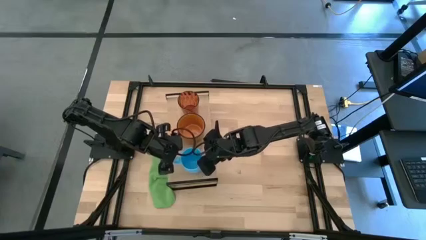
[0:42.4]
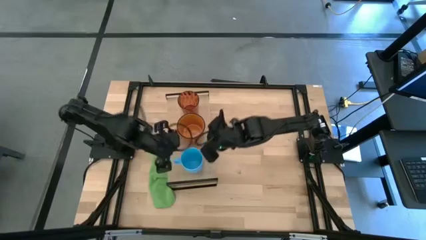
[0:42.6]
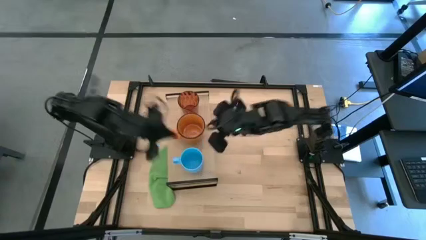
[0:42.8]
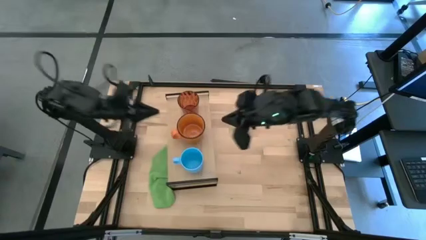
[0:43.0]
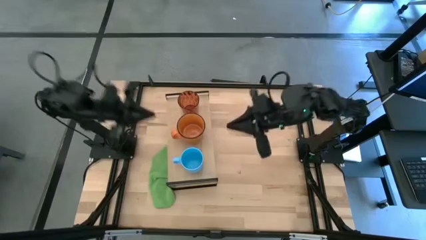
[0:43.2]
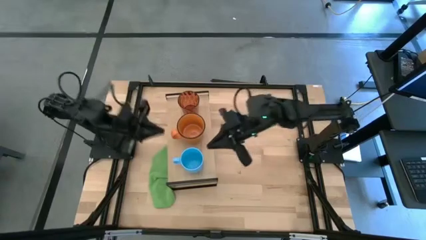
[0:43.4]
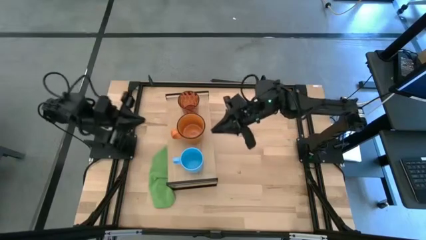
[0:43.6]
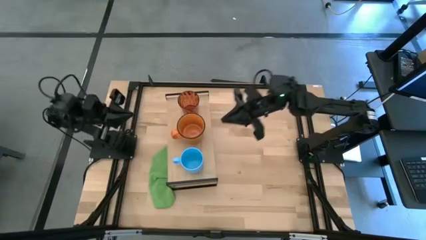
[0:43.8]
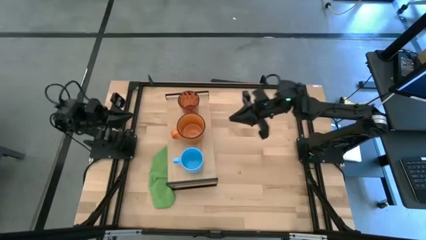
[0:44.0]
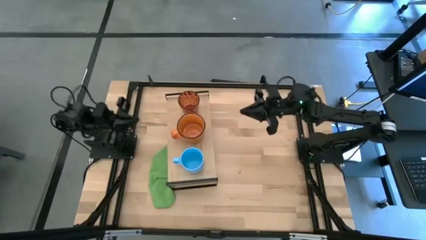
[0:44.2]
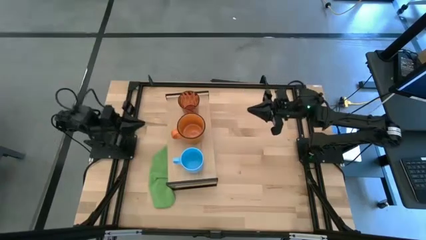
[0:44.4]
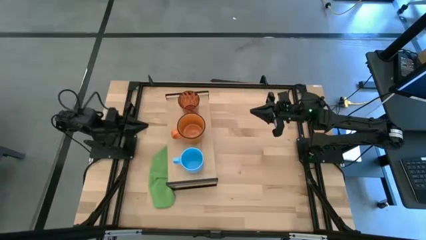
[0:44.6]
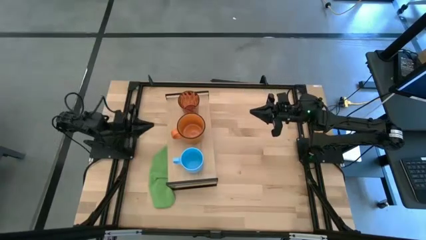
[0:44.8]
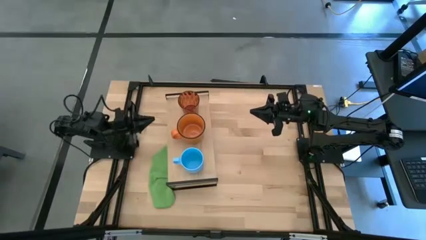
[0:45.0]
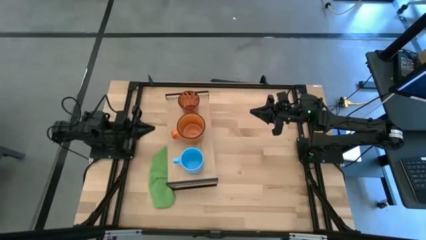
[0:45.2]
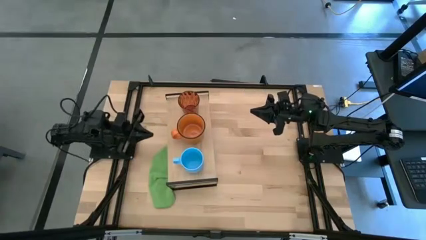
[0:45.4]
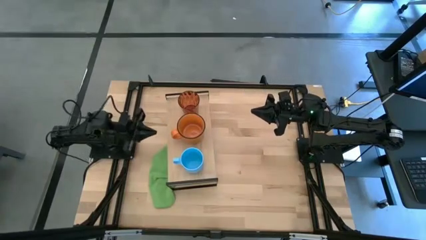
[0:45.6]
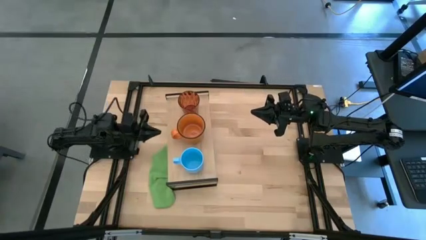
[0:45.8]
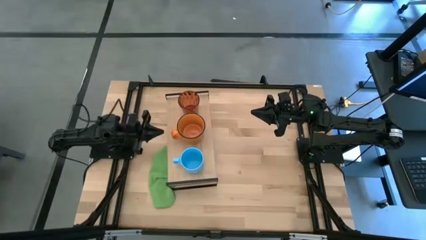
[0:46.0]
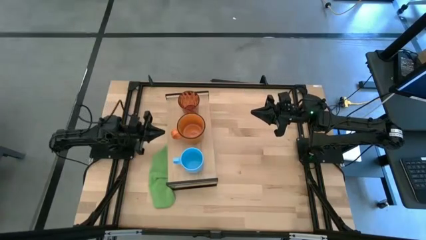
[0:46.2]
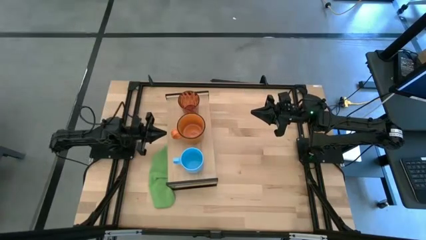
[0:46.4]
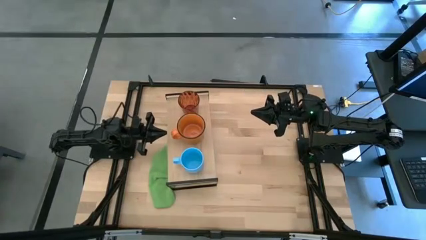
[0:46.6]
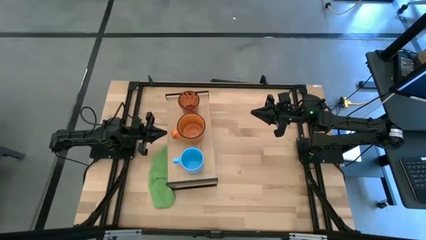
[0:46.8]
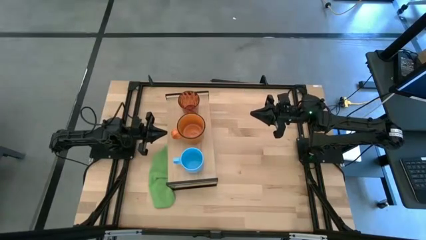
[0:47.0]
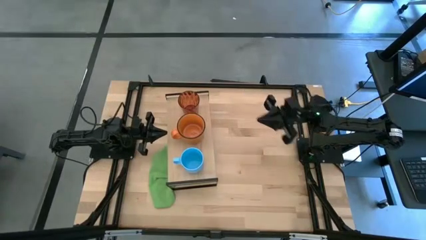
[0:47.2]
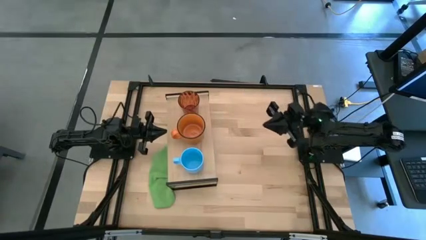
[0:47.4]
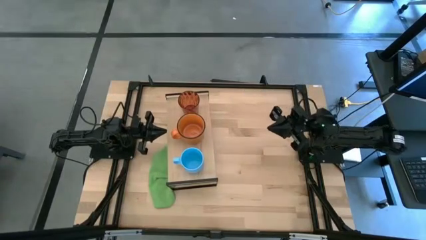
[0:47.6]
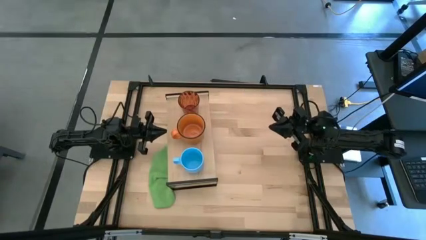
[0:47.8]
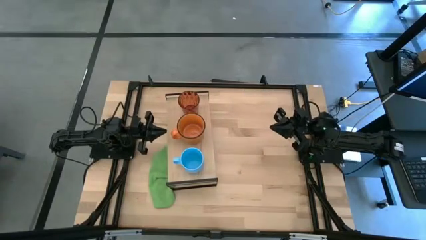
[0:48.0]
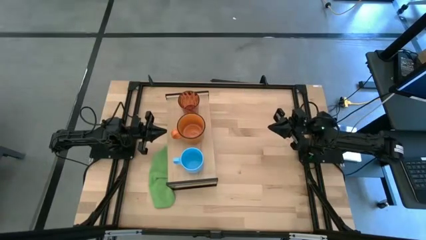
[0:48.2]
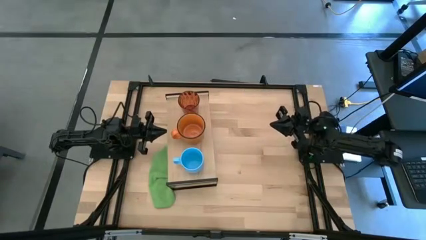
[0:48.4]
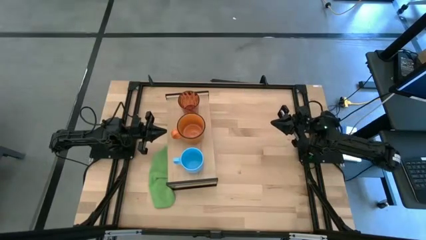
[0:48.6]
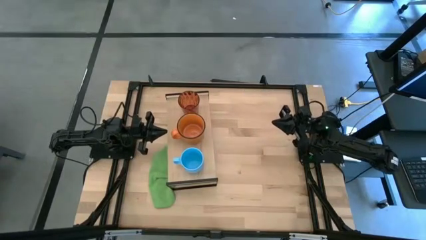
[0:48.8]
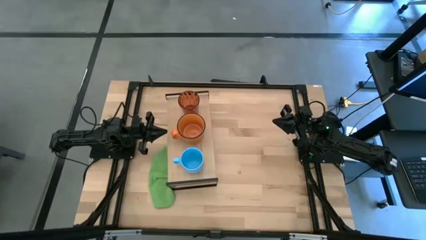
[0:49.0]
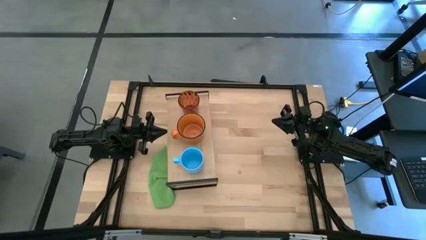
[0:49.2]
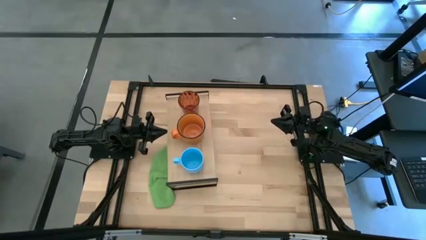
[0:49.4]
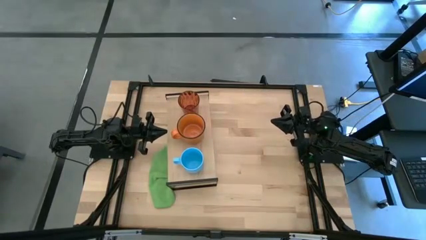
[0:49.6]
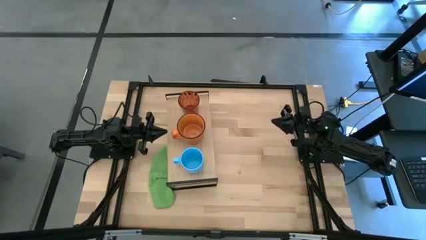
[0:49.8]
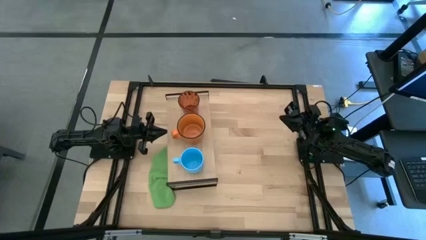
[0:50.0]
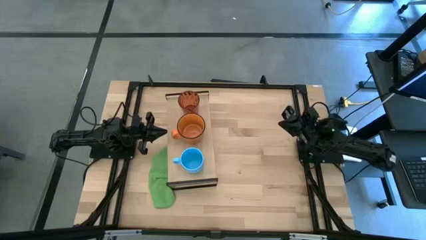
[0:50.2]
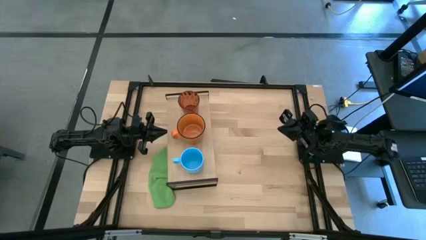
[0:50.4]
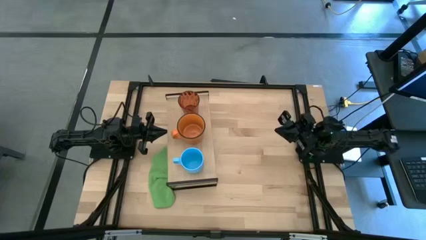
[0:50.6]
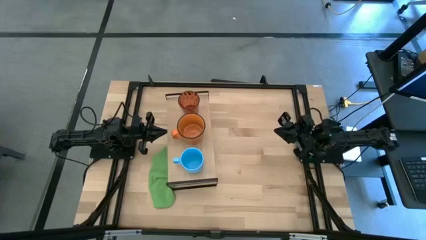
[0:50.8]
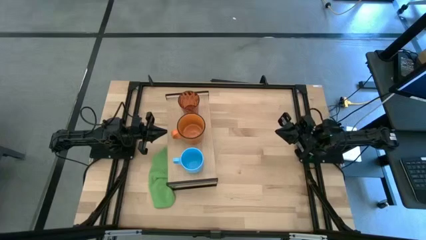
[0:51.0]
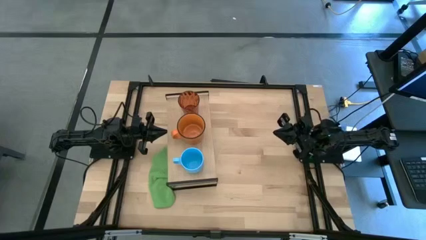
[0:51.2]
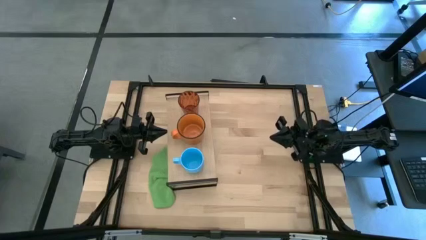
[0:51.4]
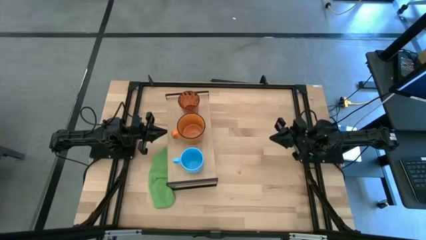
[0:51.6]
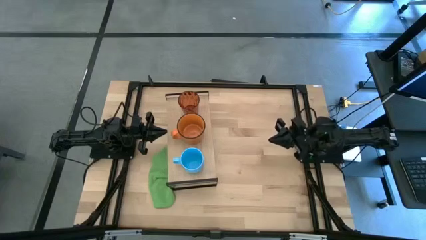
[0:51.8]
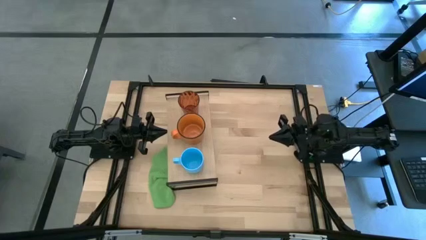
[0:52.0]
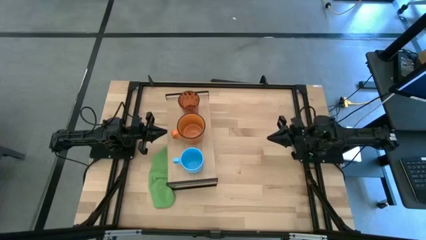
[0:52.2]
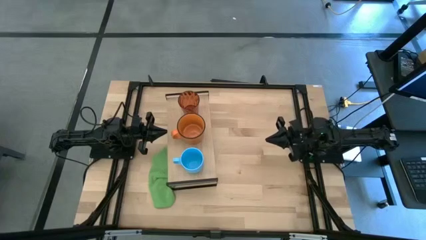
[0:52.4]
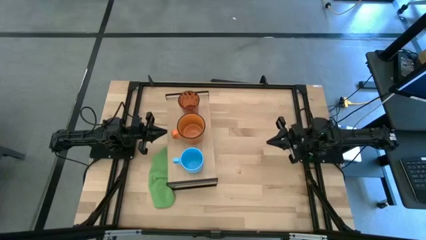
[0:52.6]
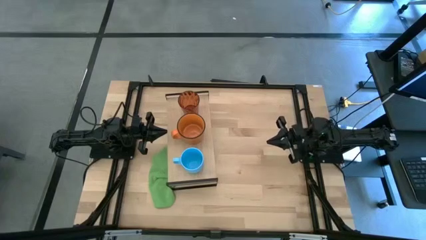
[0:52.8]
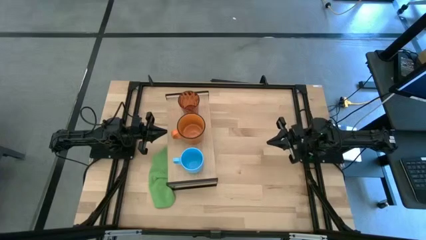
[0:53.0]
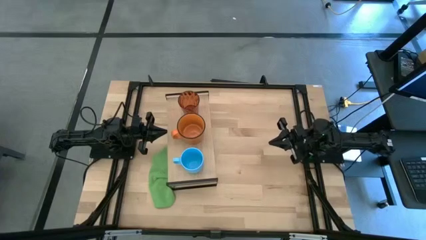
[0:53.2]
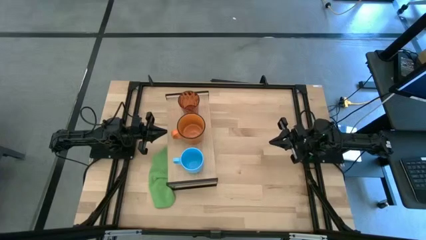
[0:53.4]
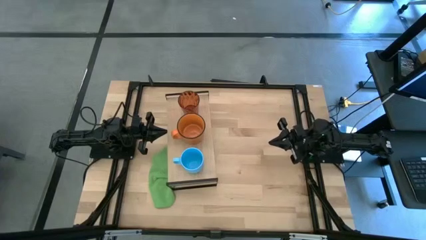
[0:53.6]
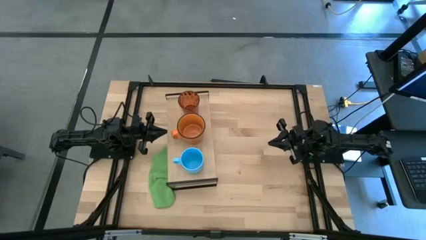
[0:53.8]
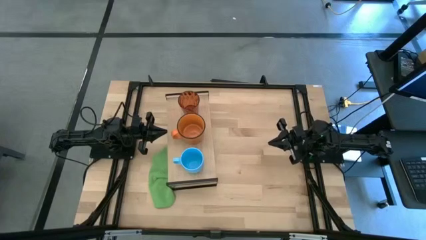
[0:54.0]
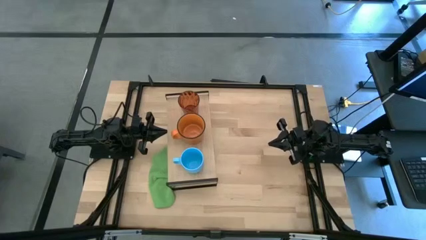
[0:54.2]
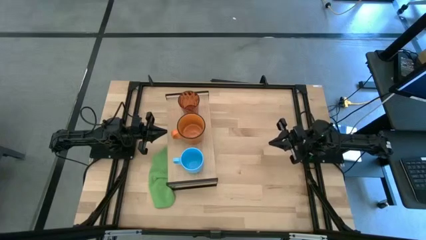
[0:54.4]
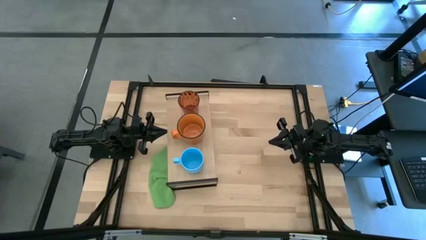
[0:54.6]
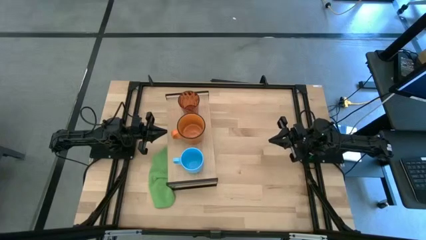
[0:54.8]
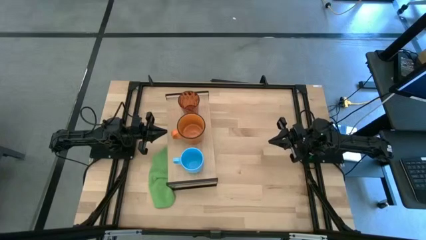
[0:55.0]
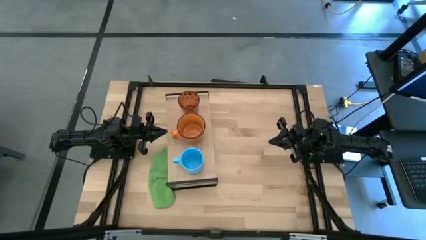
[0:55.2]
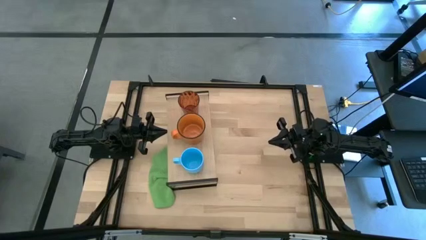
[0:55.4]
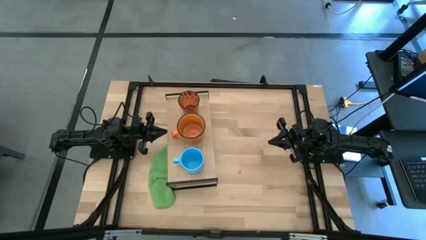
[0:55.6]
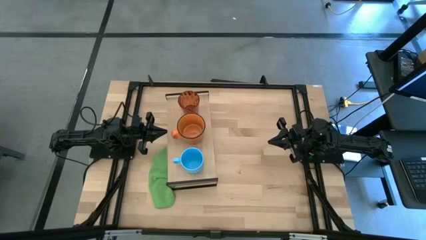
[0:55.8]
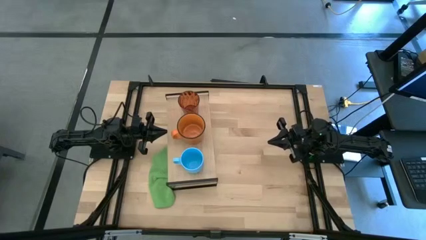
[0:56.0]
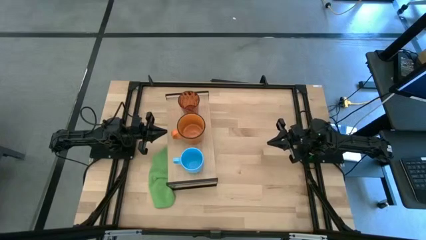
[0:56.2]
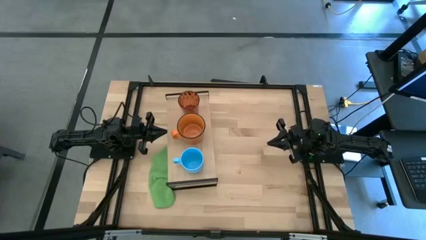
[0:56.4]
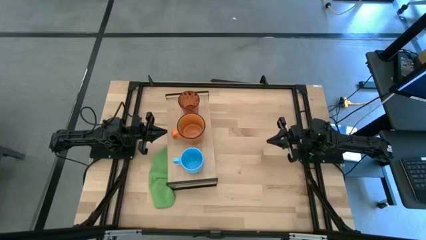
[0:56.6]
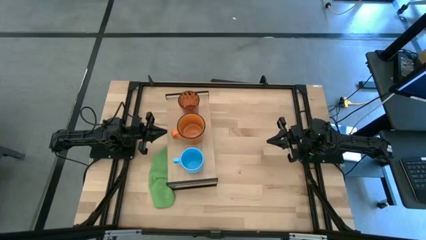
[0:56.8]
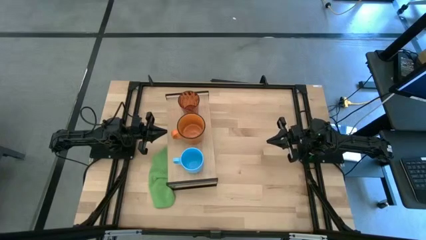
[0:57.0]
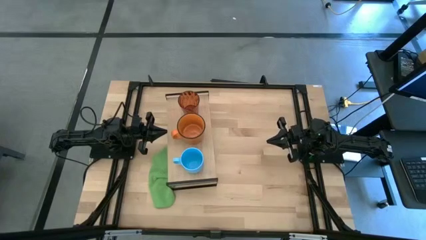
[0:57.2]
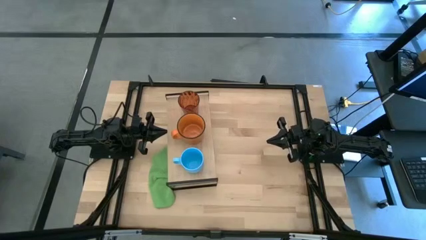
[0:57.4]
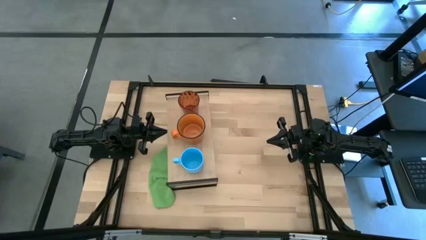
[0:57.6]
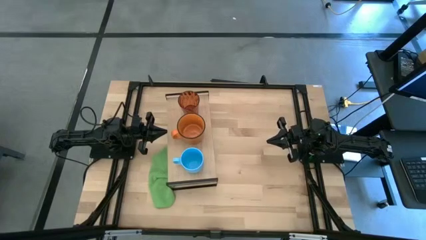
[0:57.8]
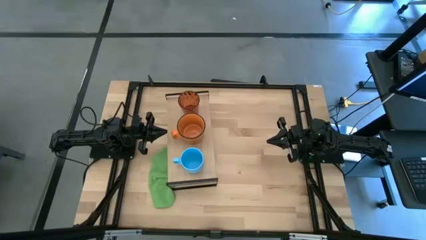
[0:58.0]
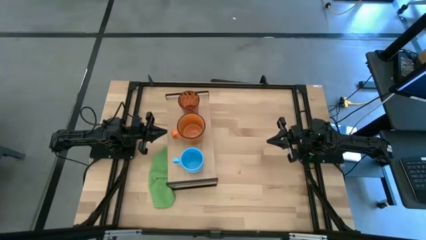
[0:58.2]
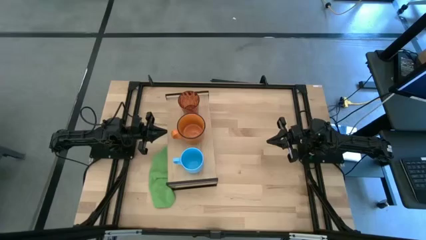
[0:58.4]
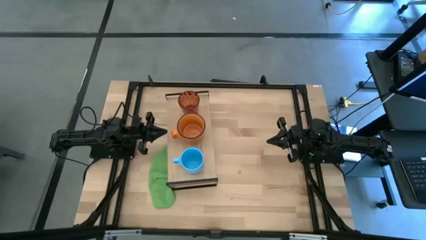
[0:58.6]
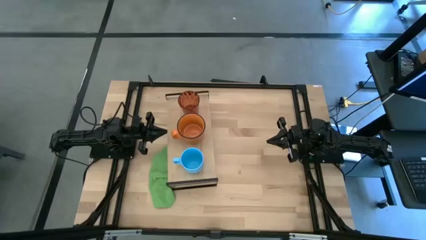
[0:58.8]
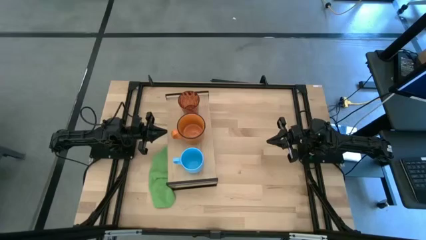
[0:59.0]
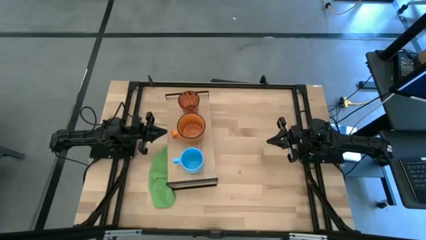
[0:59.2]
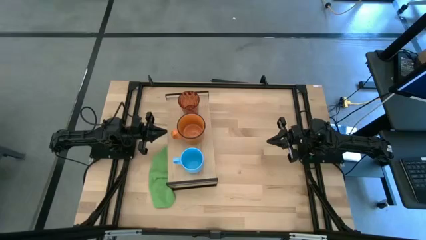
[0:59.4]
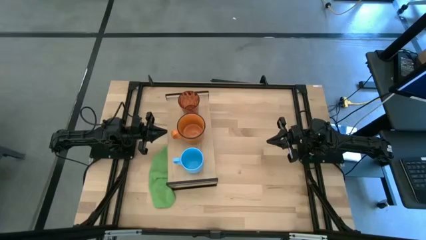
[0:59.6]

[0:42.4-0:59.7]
Task: Stack small to large cups/mugs on shelf
Return to Home Position
